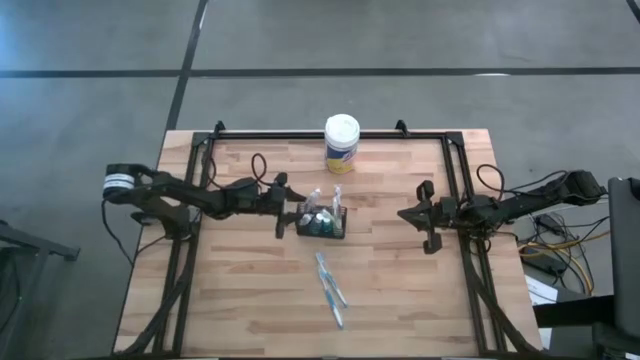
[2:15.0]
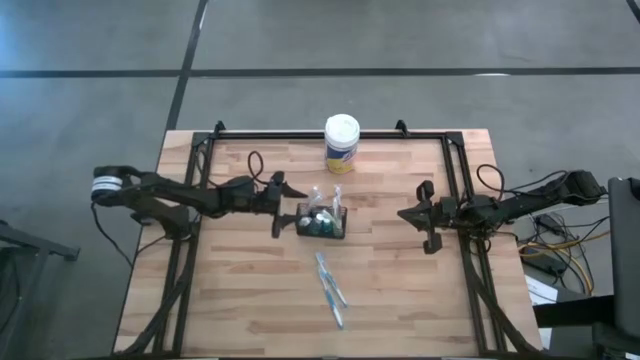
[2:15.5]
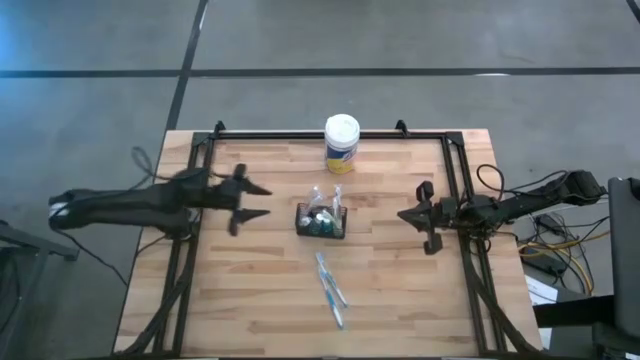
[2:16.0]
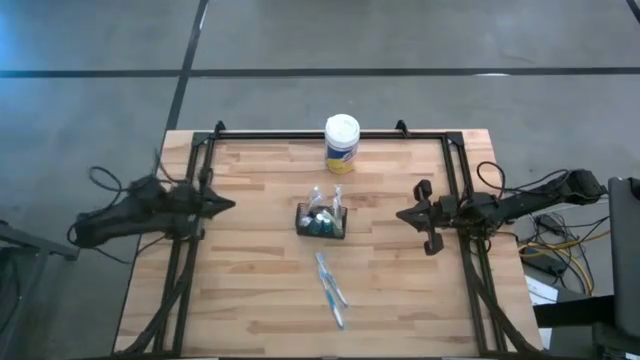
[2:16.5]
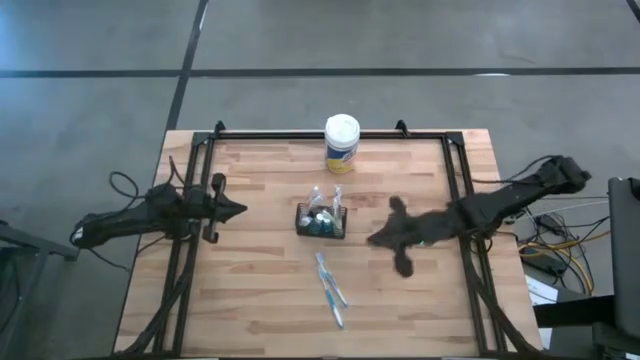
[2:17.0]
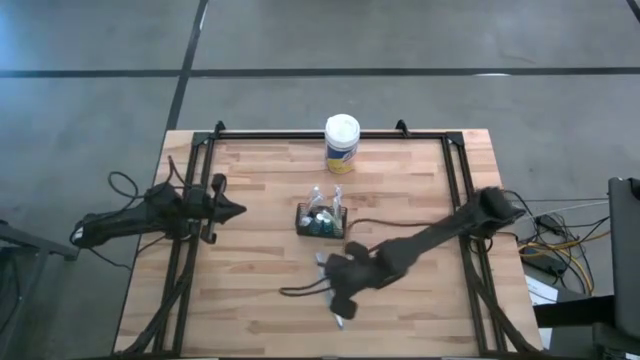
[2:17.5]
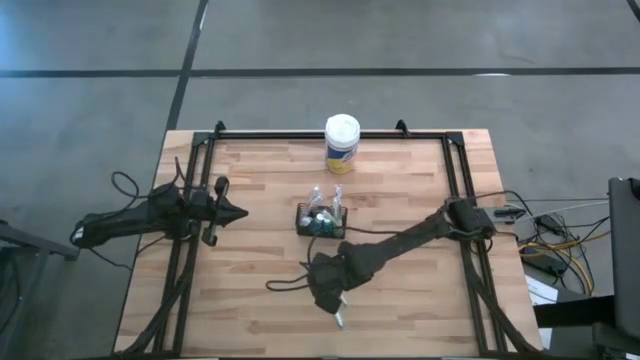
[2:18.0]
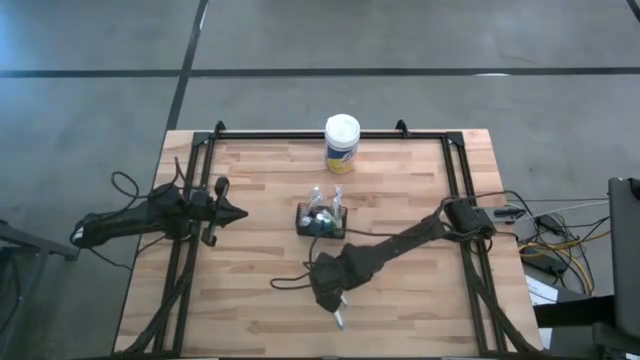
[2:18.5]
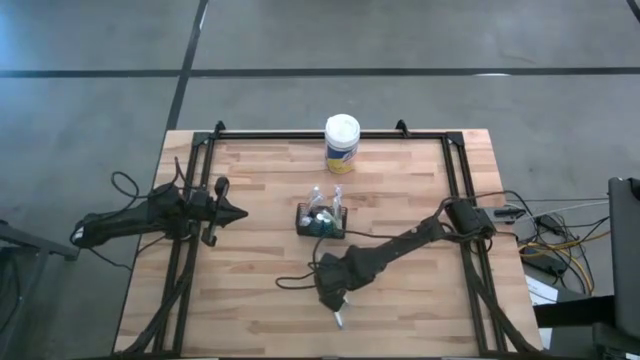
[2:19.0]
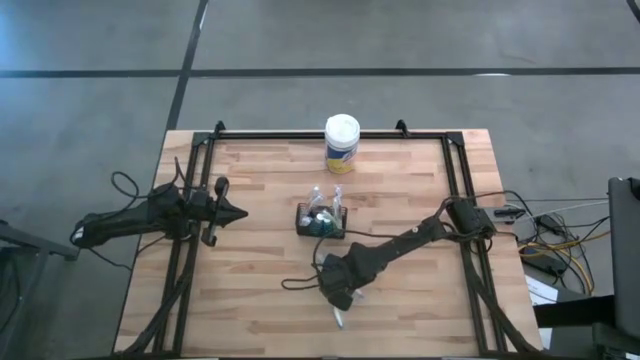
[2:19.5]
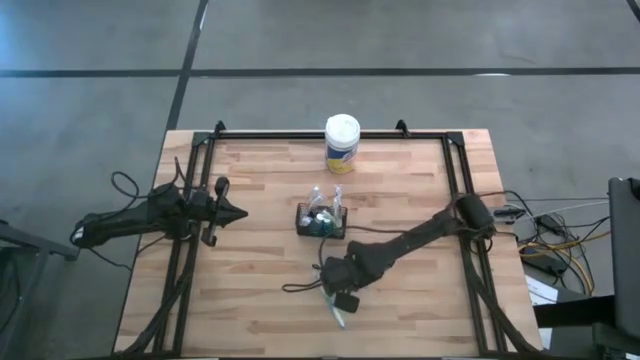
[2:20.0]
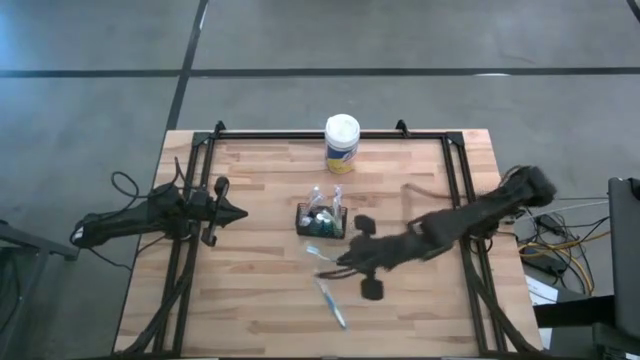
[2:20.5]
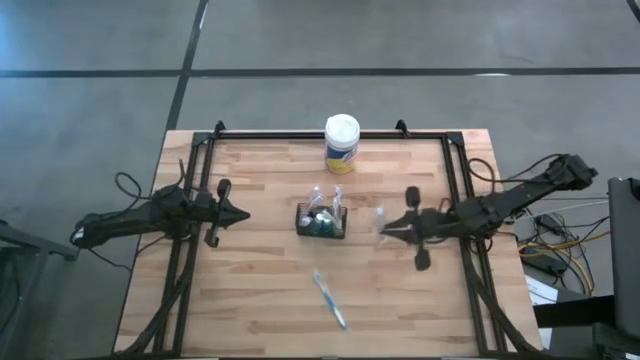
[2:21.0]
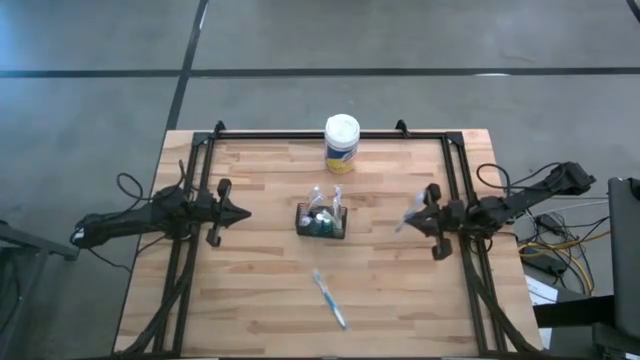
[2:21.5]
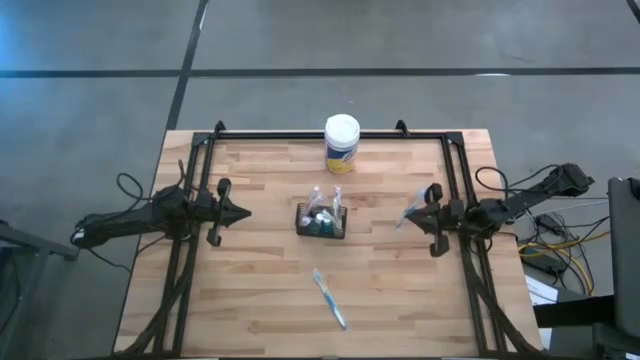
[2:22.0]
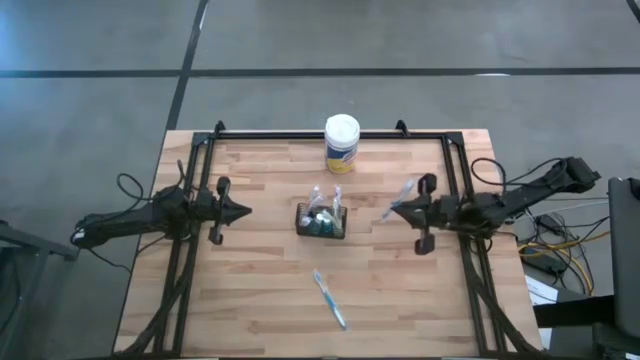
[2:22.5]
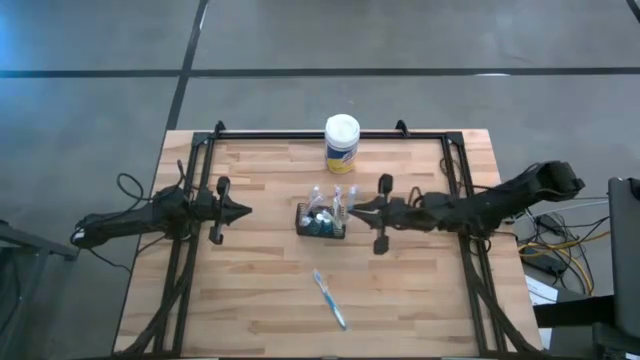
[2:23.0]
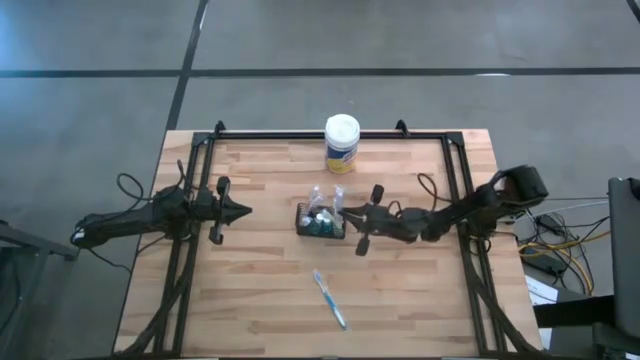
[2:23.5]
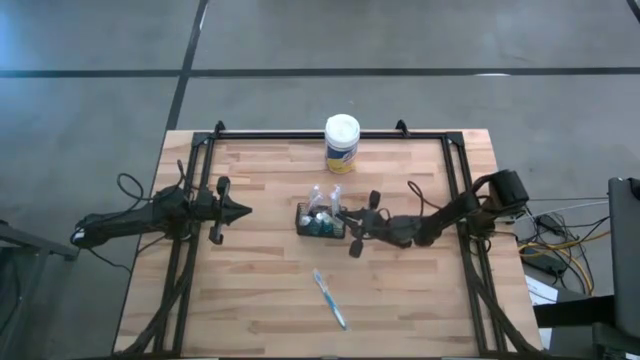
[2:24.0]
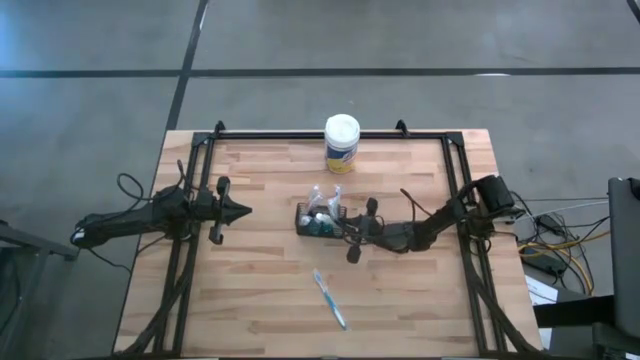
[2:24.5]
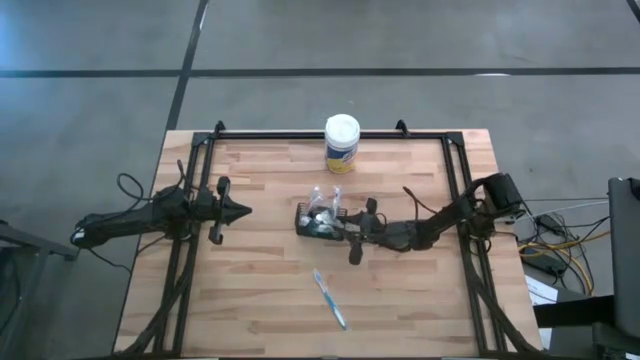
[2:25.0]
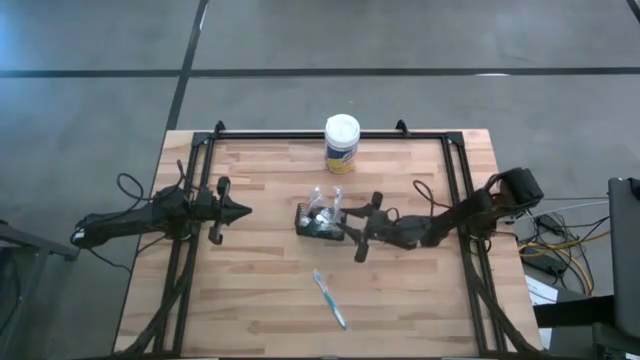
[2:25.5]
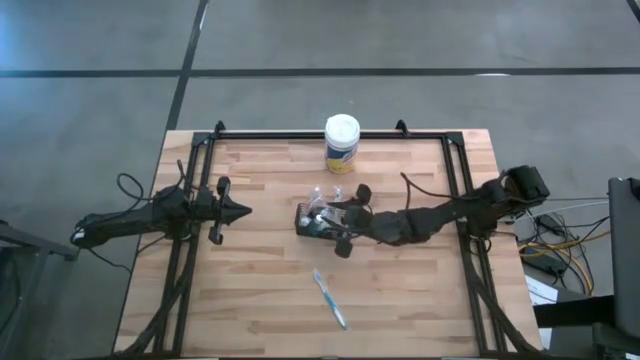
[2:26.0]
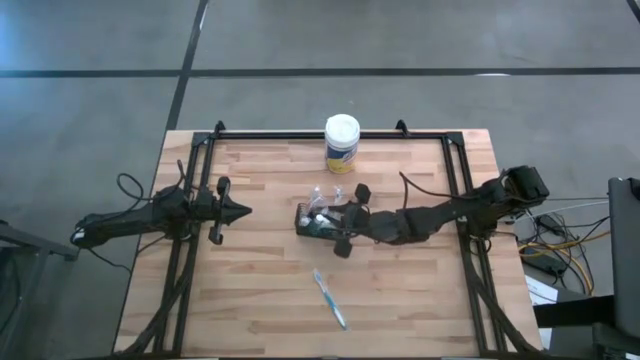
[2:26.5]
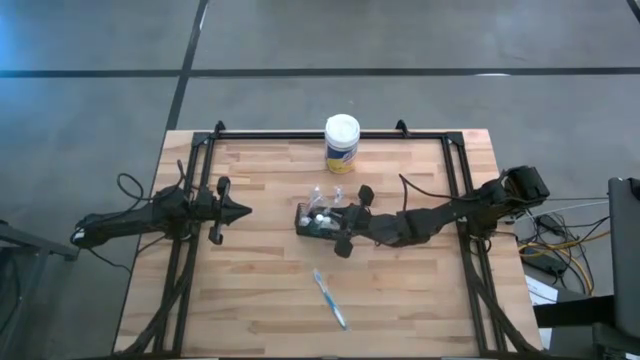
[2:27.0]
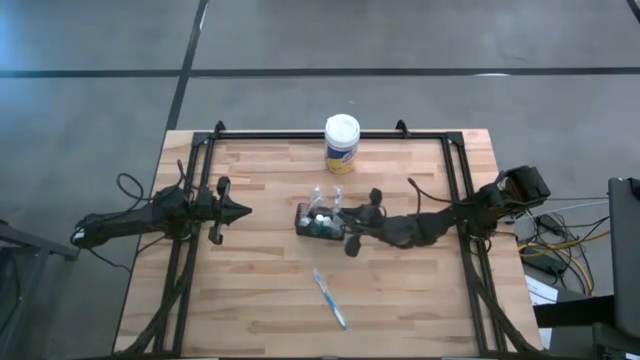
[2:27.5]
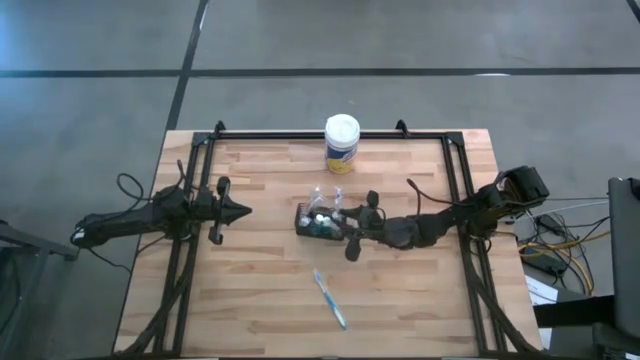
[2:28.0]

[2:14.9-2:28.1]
Task: Pick & Place toothbrushing station
Put the right blue toothbrush into the wire organizer

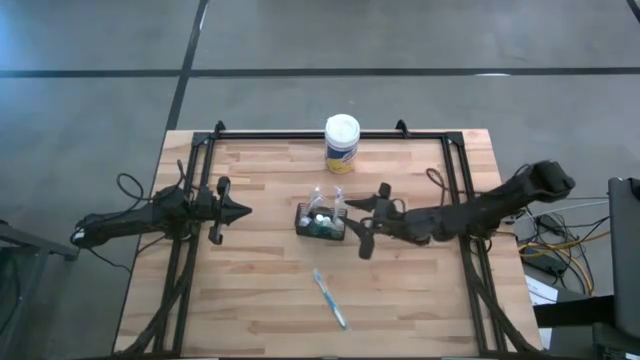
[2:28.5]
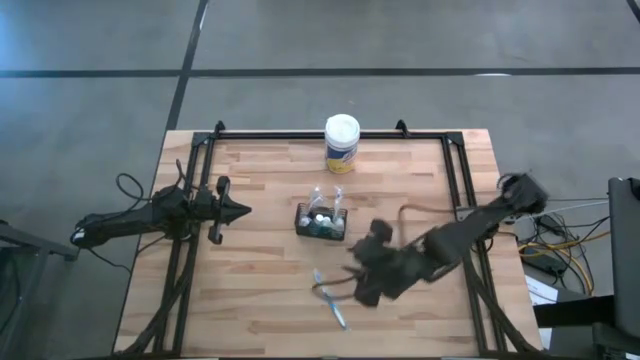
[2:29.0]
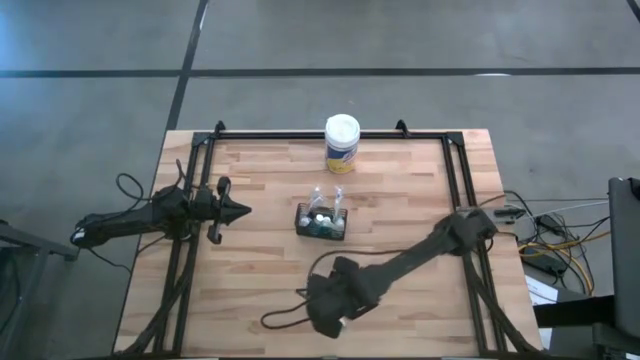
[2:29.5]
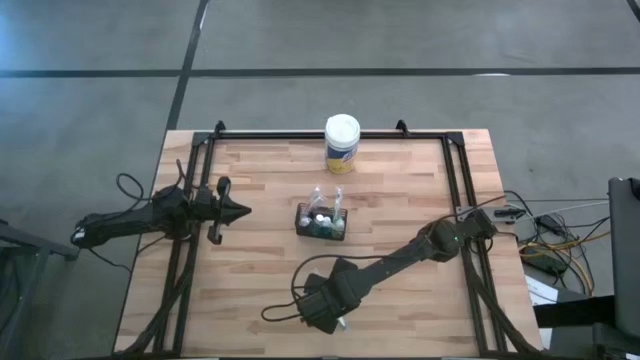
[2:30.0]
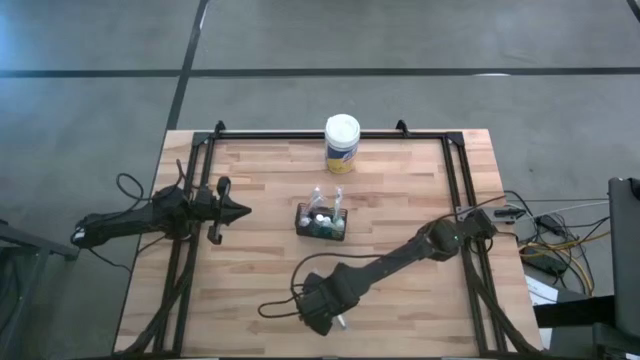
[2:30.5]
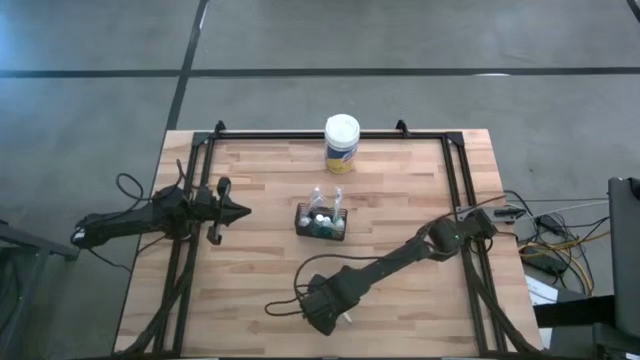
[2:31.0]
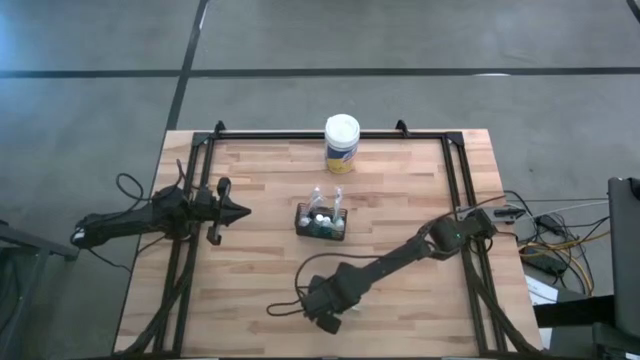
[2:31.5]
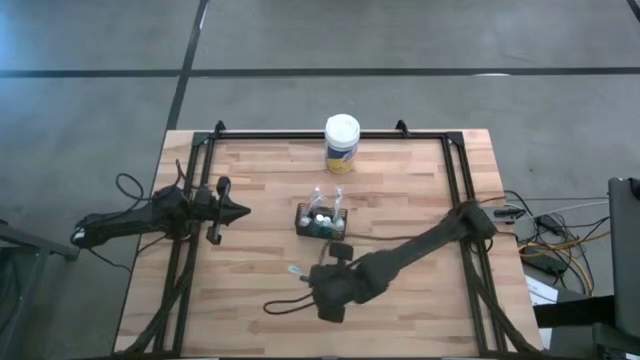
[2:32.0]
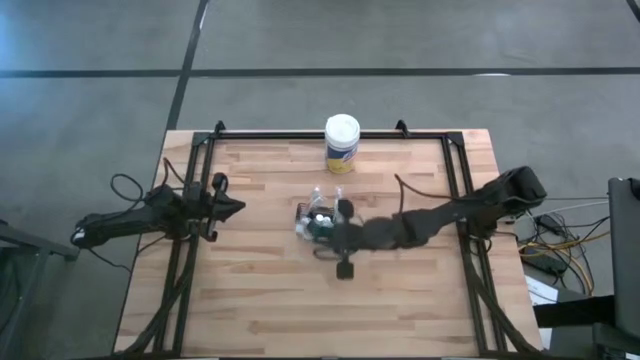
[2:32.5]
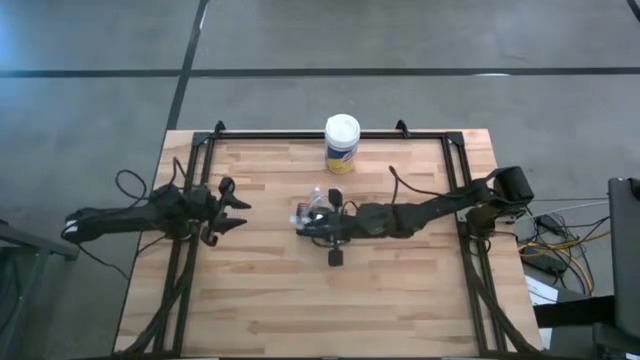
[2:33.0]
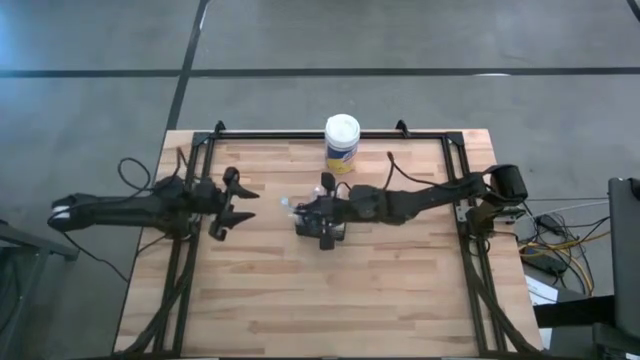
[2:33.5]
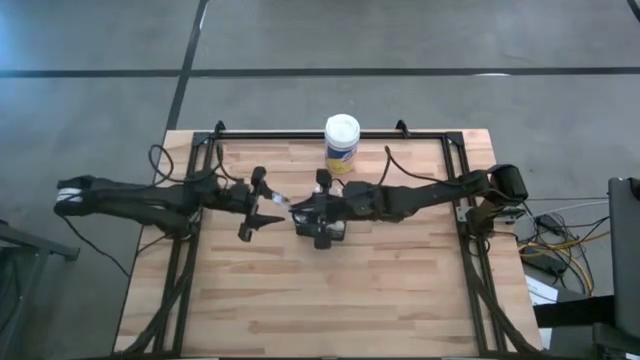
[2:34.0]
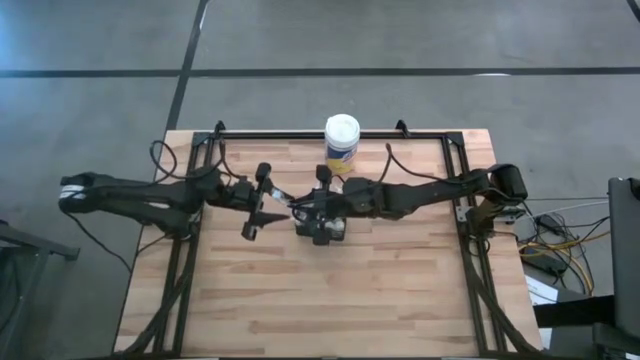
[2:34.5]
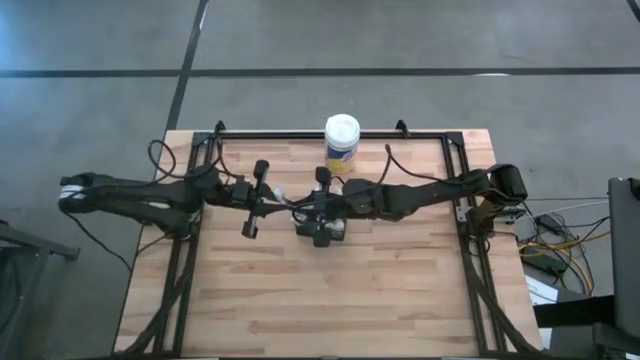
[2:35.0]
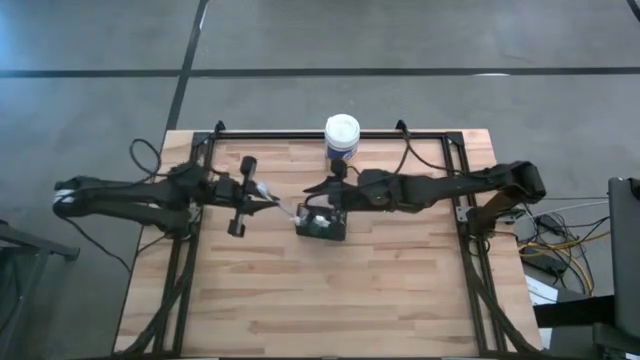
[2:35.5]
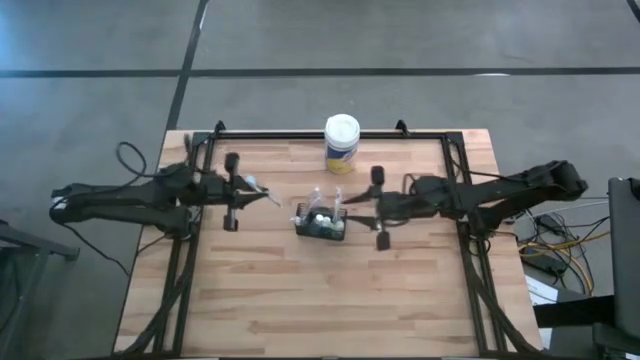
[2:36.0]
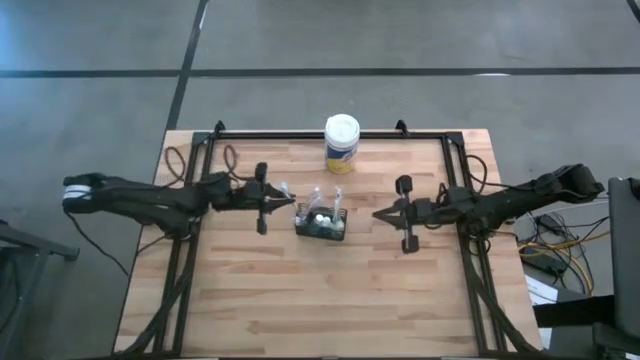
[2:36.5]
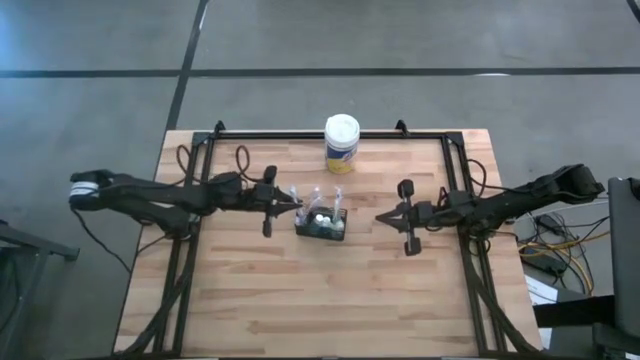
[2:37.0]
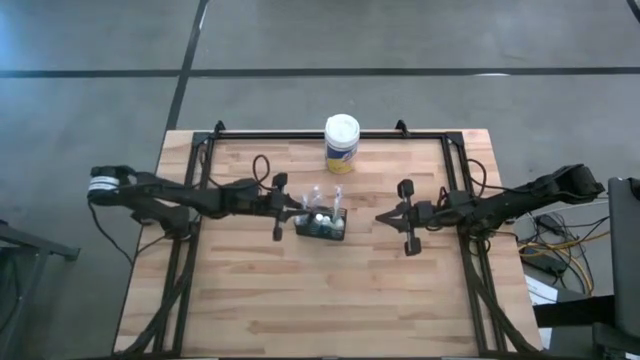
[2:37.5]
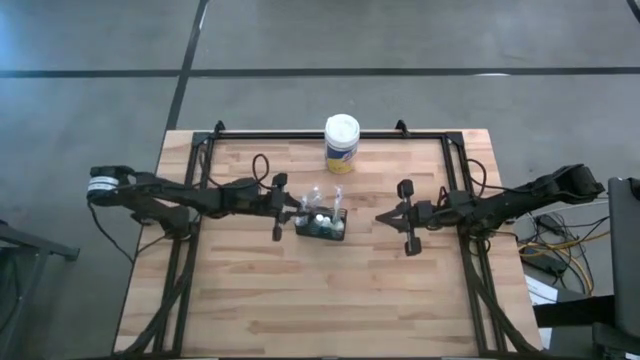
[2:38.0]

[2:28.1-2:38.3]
Put the blue toothbrush into the wire organizer
